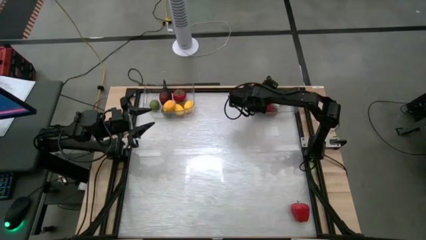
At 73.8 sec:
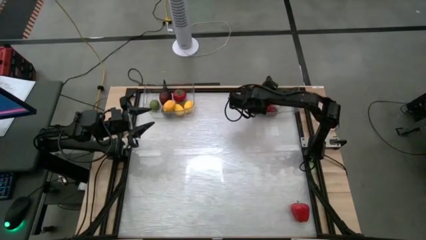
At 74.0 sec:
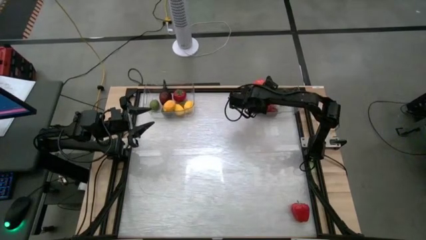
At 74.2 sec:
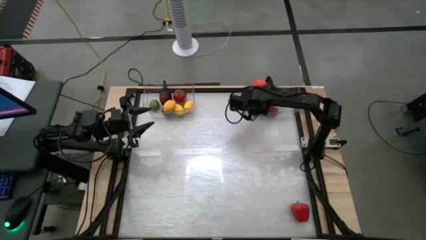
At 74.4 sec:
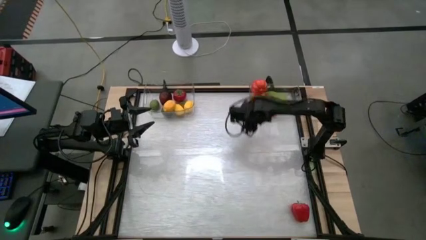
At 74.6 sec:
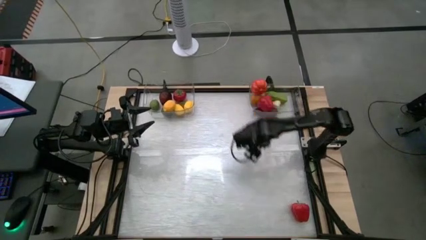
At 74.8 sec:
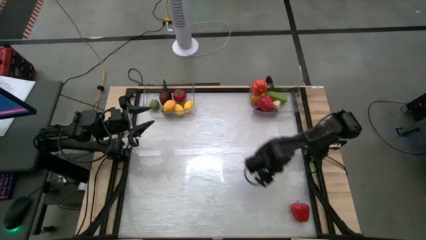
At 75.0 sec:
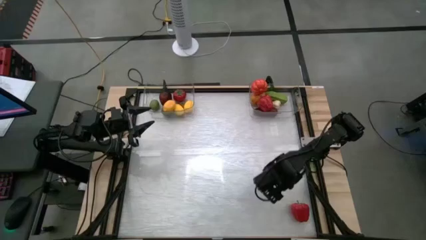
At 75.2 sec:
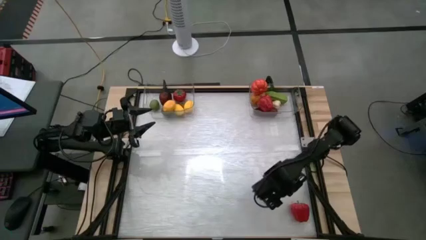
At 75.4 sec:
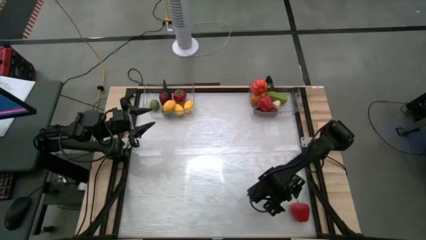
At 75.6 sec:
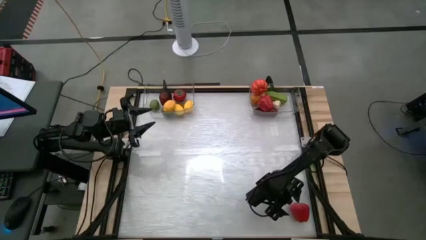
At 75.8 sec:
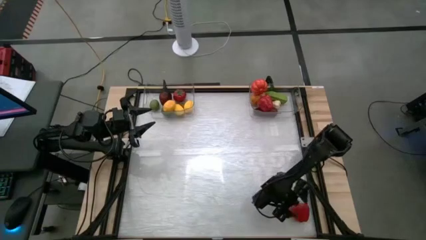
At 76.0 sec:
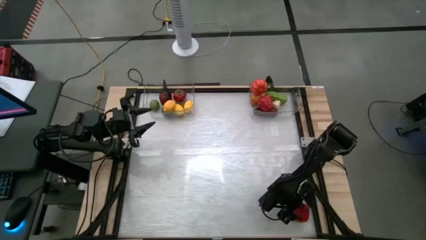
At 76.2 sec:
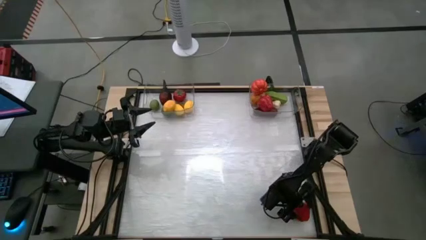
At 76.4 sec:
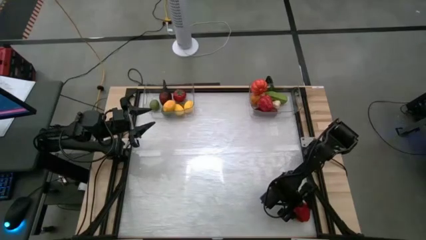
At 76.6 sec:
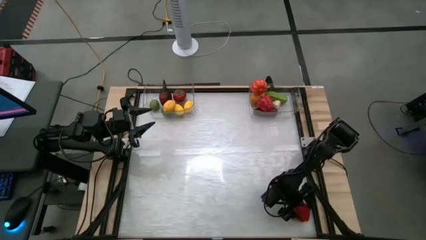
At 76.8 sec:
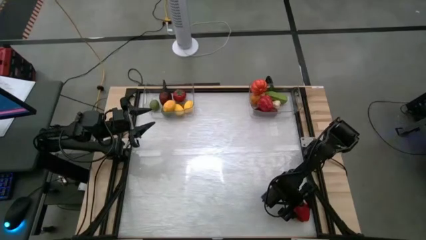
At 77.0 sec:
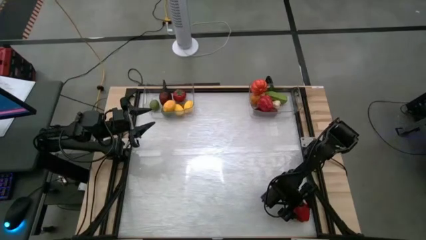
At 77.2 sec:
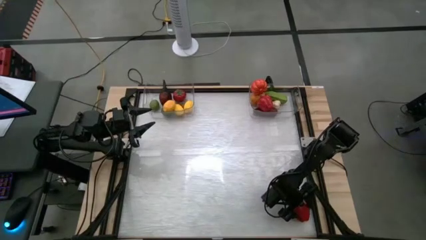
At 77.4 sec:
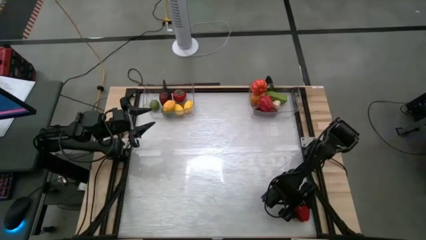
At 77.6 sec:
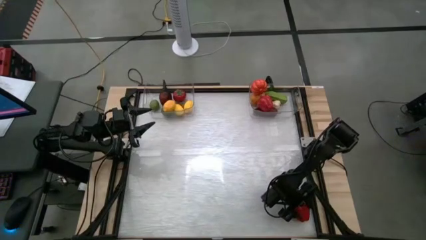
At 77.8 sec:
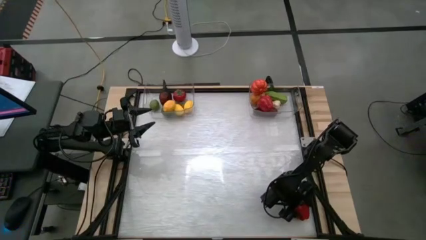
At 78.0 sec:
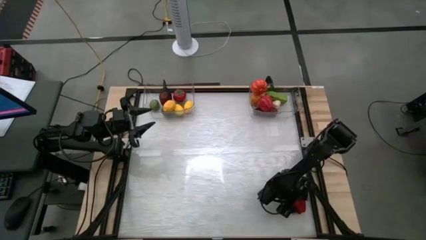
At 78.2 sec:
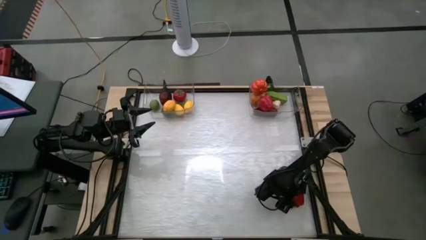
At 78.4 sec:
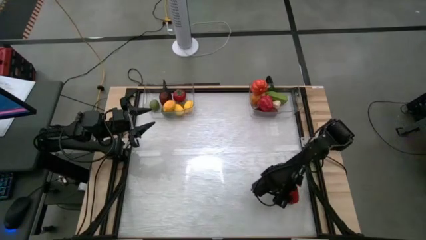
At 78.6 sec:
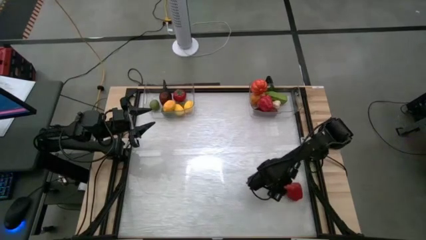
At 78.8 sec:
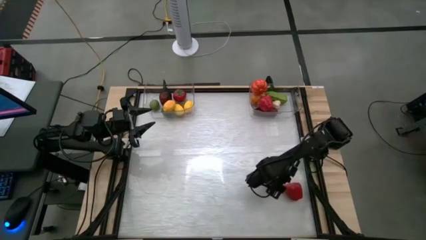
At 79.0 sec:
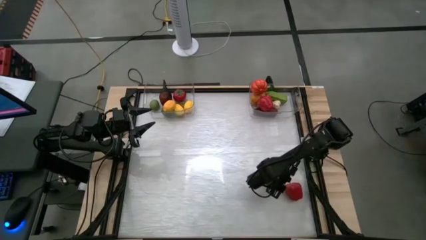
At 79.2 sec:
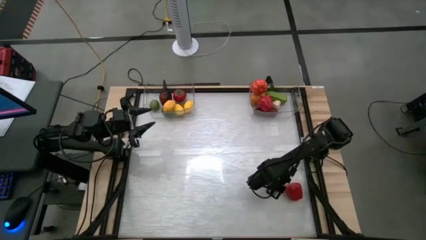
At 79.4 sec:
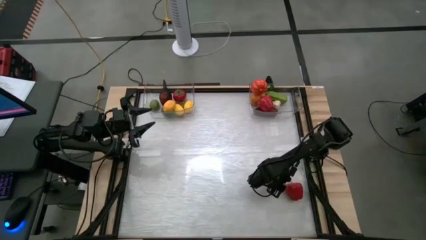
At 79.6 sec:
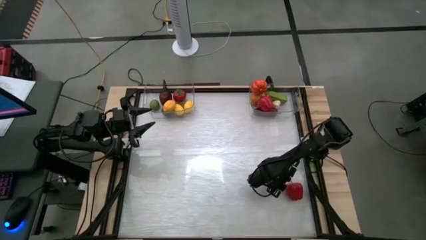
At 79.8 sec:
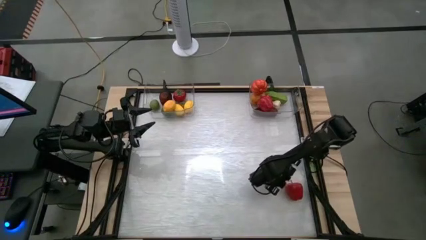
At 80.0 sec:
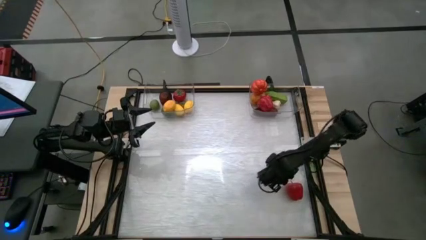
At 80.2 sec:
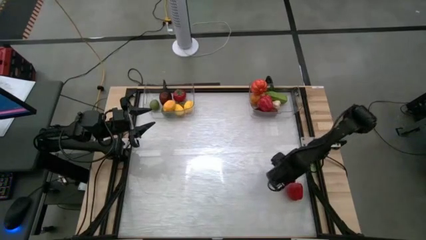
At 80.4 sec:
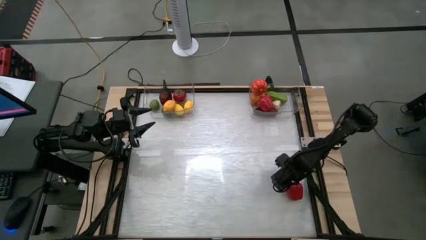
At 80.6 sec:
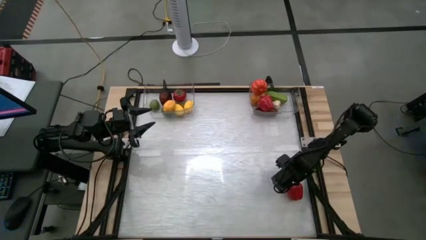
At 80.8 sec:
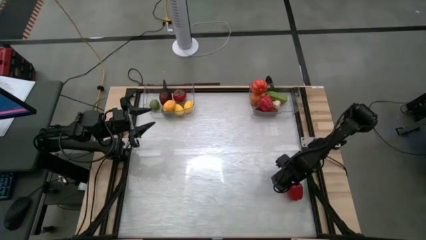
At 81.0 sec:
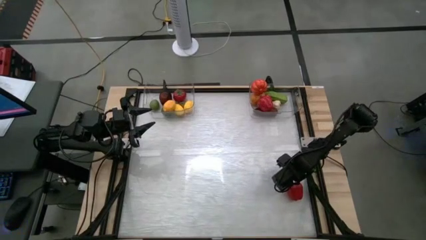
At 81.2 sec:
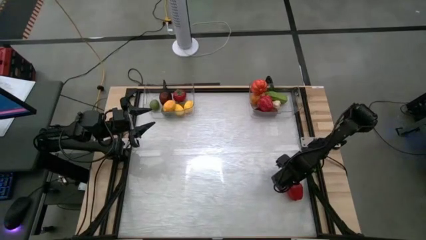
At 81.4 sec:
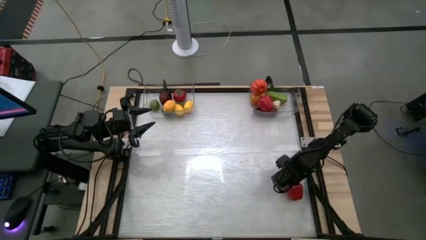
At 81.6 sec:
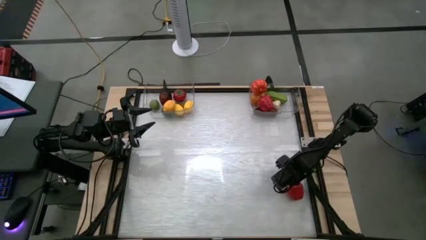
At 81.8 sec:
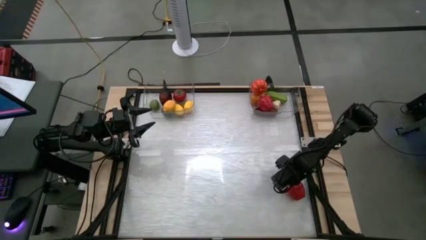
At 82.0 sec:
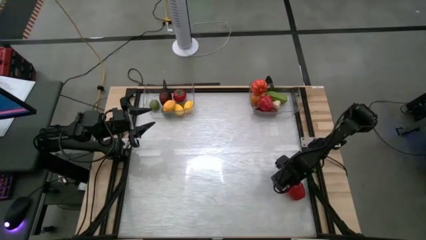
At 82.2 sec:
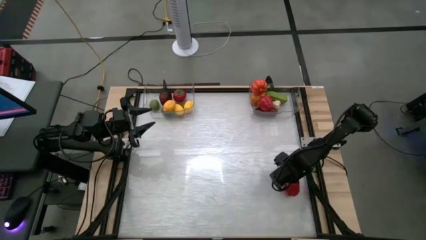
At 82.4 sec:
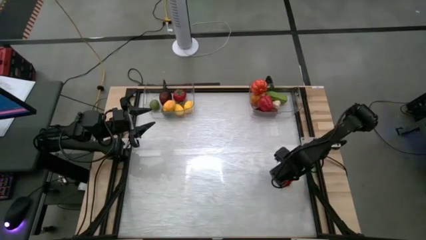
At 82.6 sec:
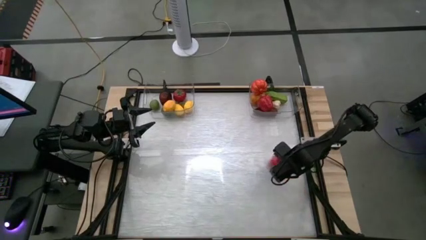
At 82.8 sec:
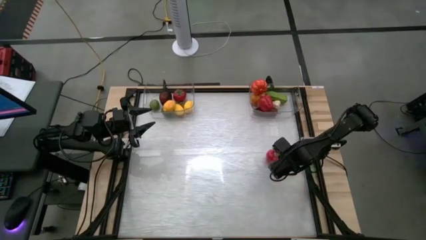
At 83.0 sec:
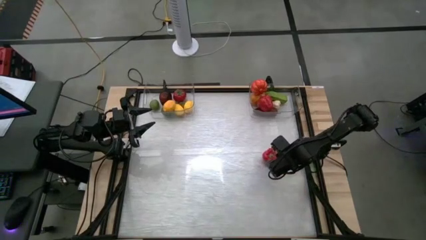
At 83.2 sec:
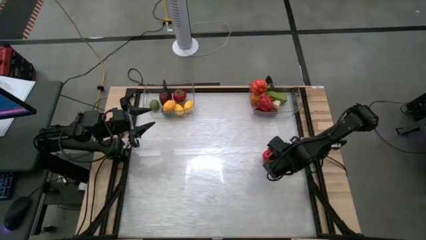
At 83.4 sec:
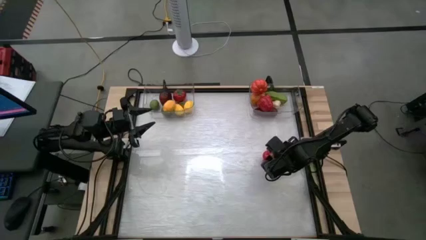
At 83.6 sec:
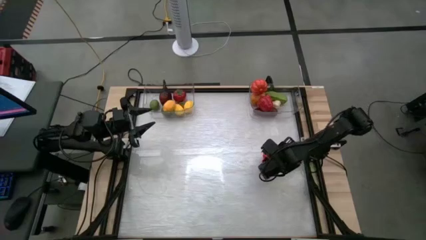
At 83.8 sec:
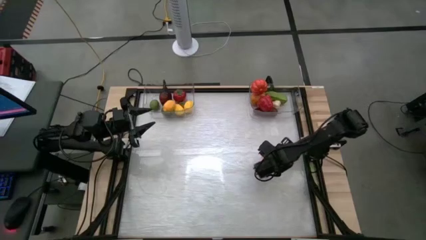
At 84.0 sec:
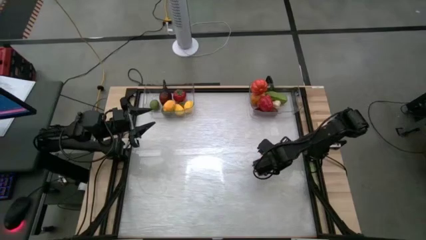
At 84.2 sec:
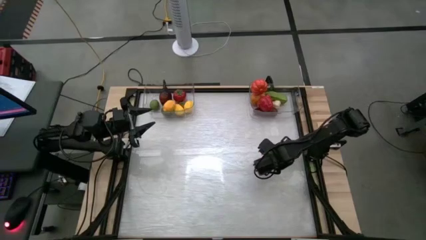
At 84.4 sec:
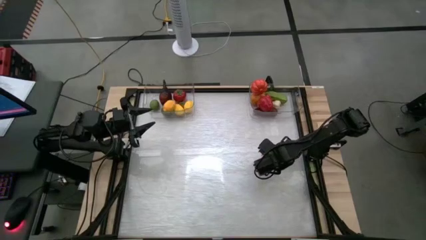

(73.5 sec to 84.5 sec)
Task: Sort produce into baskets
Put the red bell pepper into the right transparent bin

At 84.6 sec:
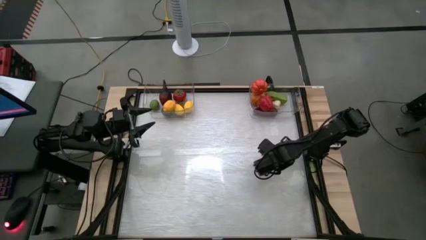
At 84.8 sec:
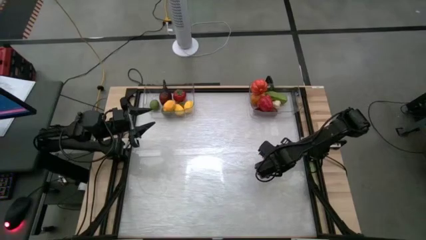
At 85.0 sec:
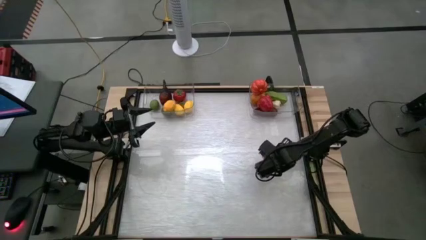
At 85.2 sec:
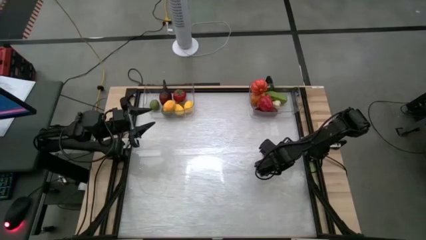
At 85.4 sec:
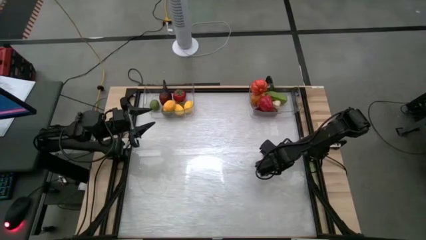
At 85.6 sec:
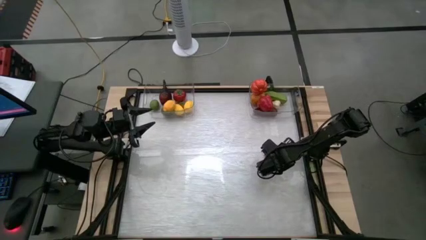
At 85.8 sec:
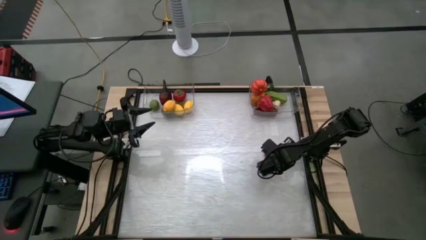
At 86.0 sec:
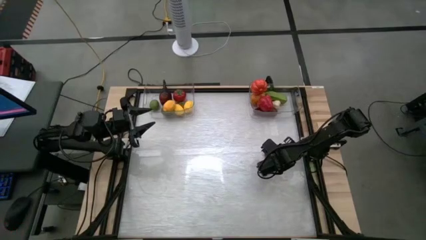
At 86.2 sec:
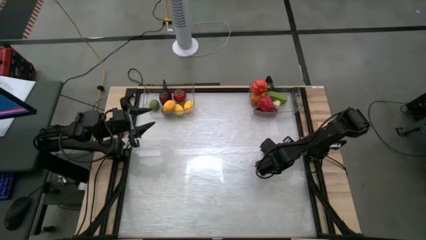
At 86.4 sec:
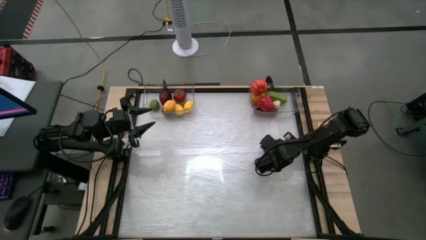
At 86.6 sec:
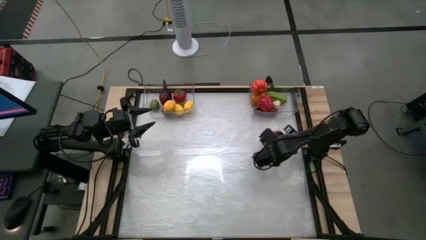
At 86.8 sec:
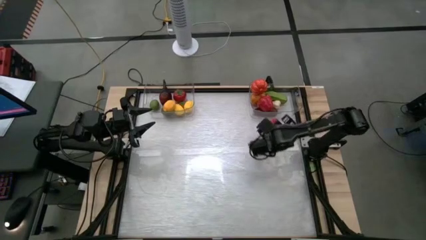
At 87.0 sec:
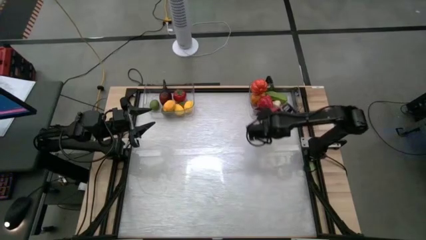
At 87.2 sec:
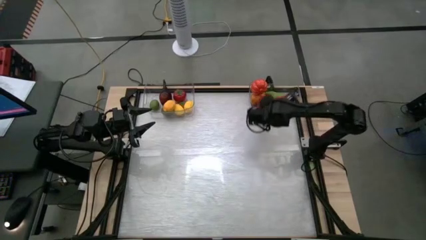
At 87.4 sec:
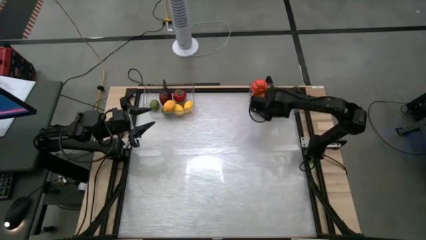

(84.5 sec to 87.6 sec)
Put the red bell pepper into the right transparent bin

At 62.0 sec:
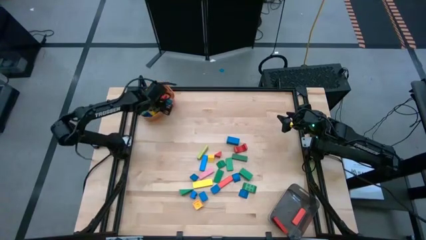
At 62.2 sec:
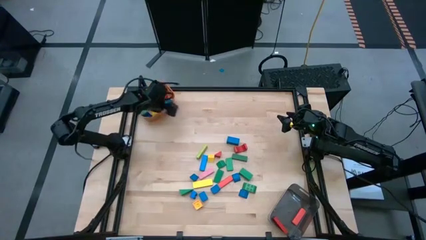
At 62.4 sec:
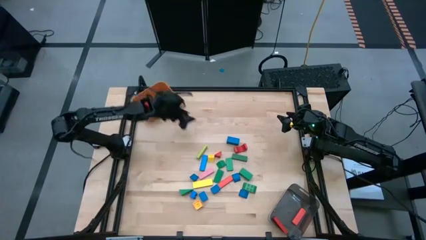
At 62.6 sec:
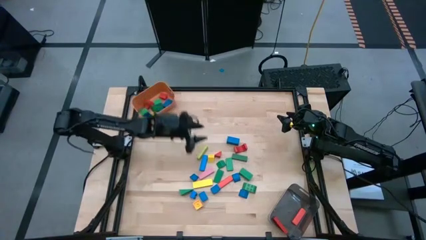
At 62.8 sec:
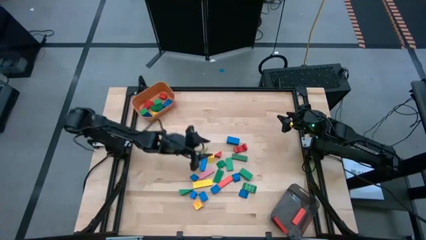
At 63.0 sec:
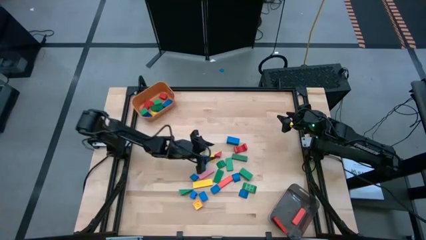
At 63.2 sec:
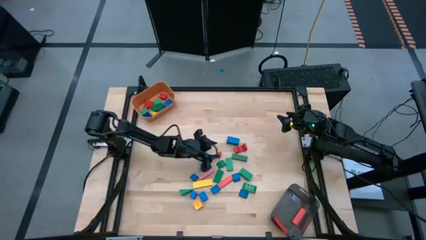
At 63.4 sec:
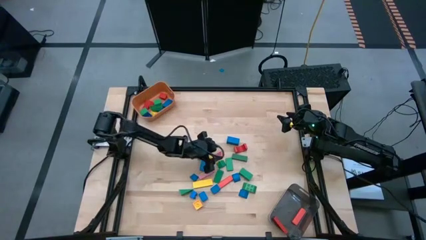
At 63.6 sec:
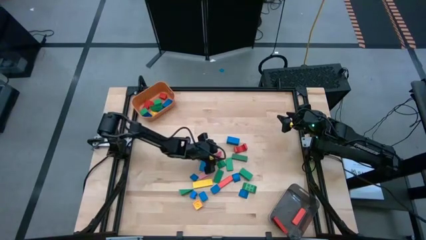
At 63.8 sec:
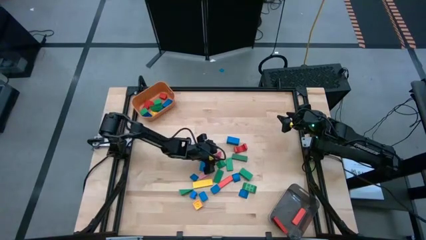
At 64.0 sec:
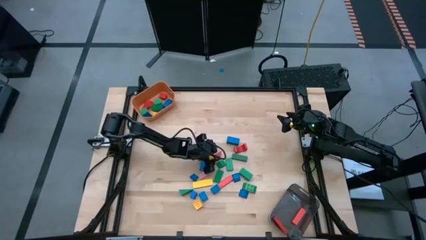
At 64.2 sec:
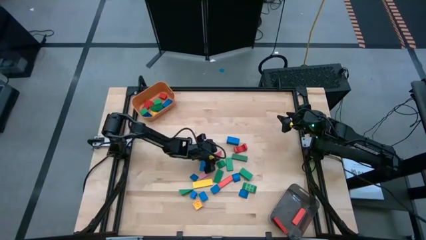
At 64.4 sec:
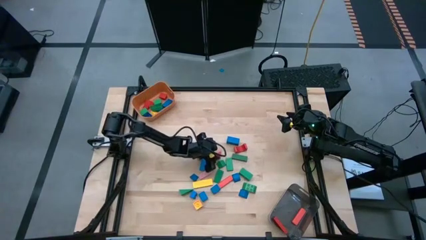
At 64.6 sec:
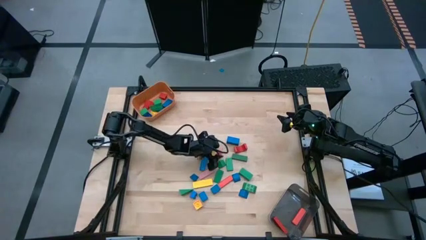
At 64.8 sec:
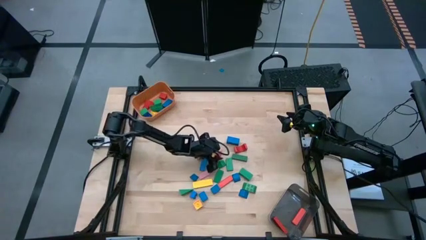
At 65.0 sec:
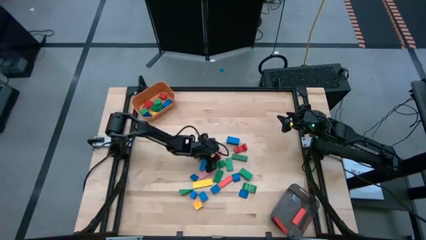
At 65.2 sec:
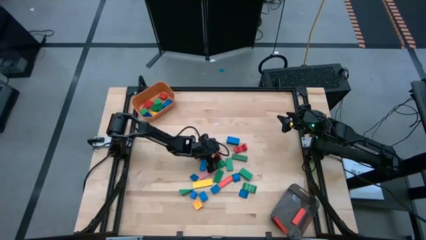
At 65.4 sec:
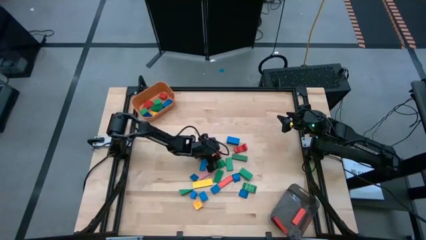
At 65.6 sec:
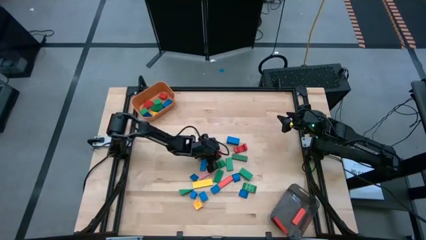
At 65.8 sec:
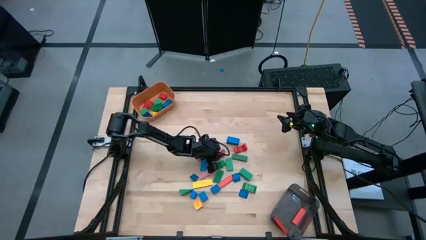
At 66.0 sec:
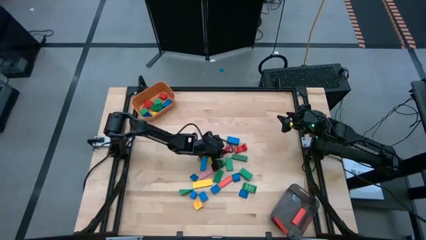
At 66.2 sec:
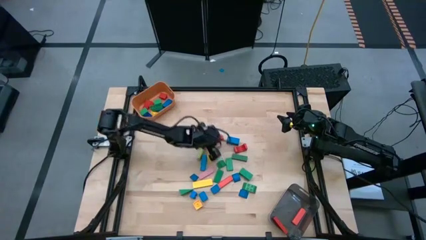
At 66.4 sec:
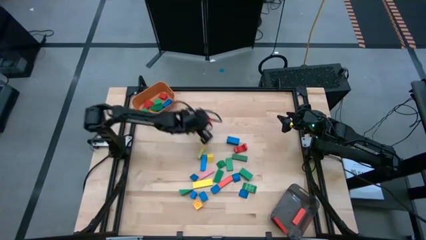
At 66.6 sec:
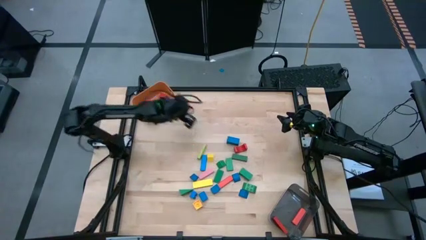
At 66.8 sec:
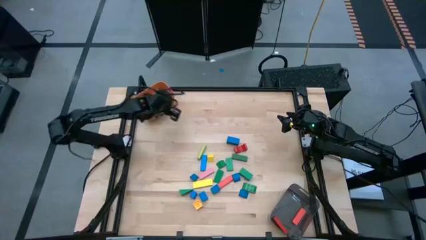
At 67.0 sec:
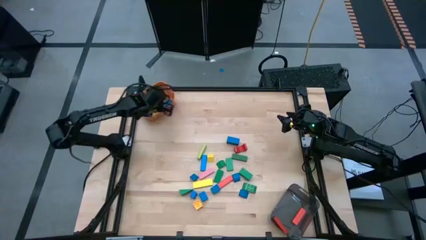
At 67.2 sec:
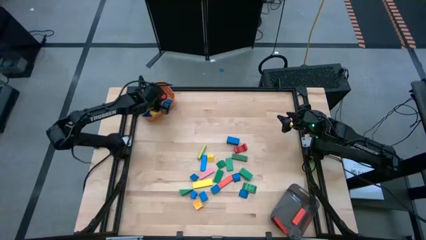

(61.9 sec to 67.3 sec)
Task: Sort blocks by size
Put the small red block into the orange bin
